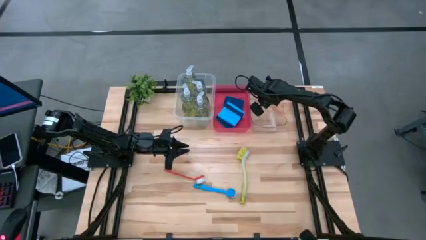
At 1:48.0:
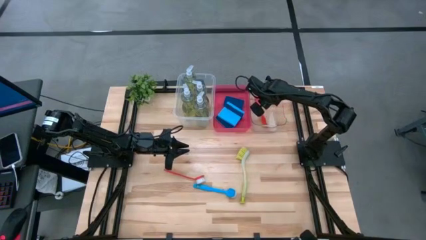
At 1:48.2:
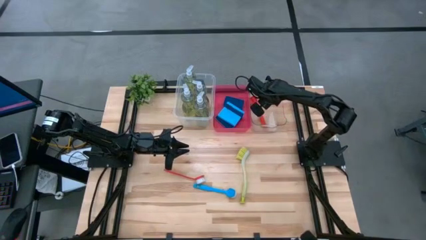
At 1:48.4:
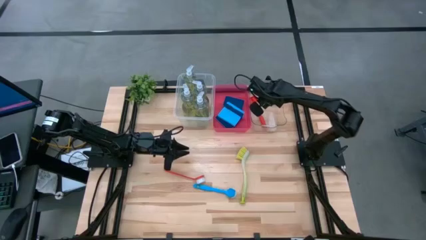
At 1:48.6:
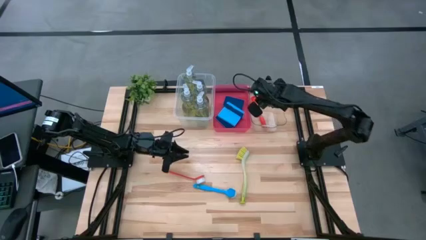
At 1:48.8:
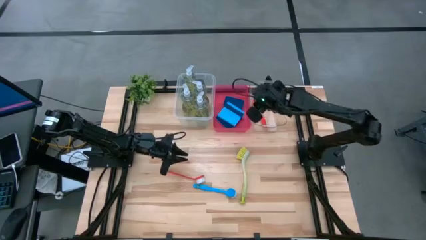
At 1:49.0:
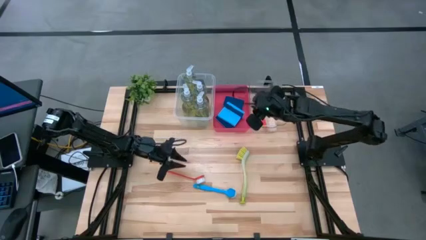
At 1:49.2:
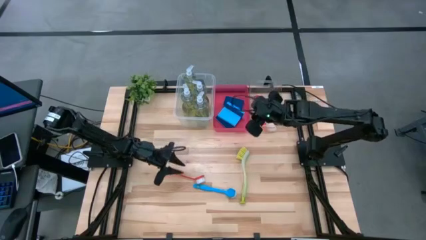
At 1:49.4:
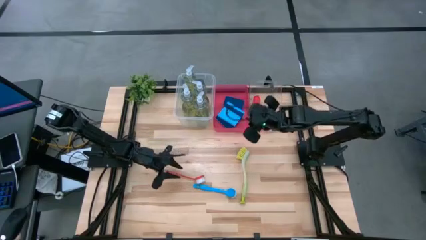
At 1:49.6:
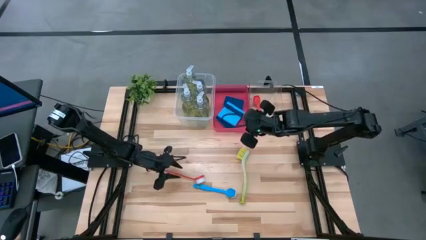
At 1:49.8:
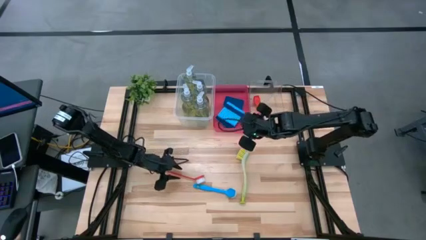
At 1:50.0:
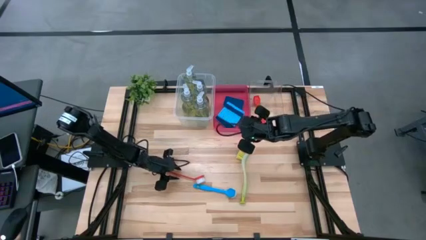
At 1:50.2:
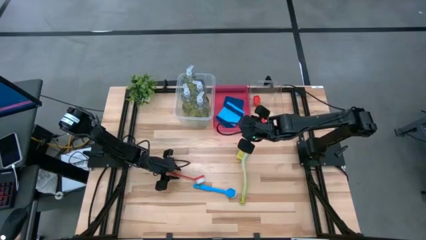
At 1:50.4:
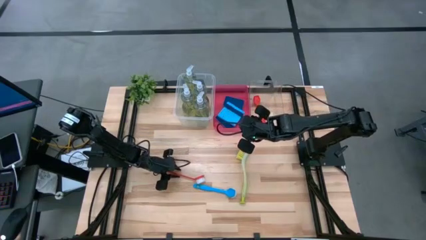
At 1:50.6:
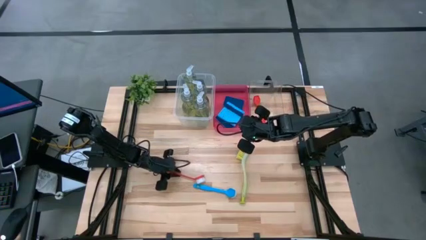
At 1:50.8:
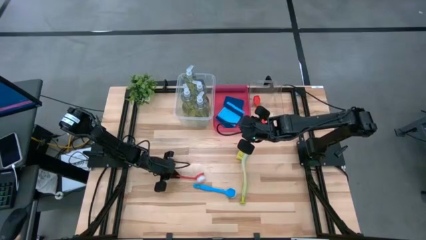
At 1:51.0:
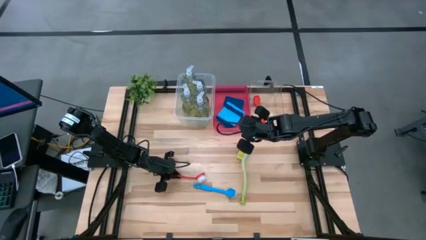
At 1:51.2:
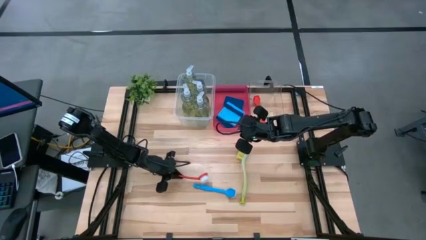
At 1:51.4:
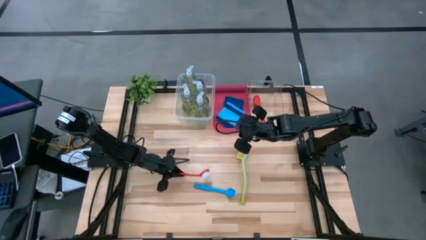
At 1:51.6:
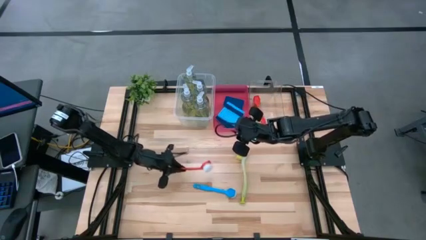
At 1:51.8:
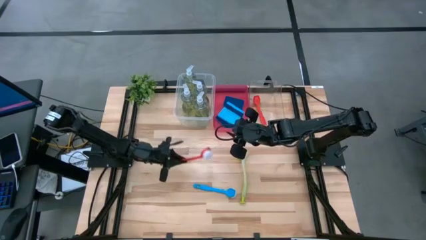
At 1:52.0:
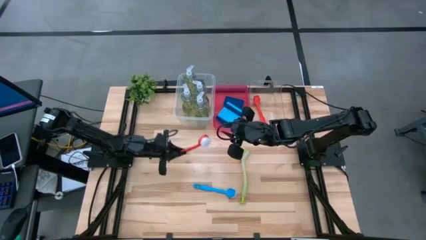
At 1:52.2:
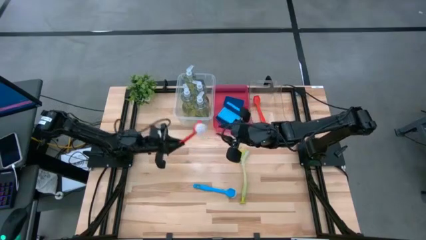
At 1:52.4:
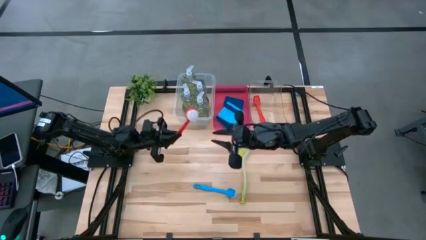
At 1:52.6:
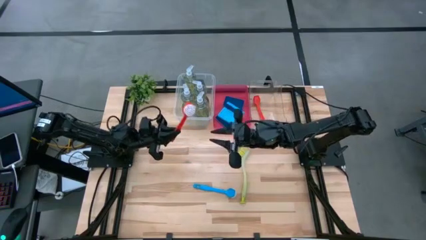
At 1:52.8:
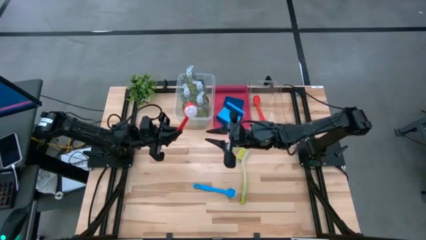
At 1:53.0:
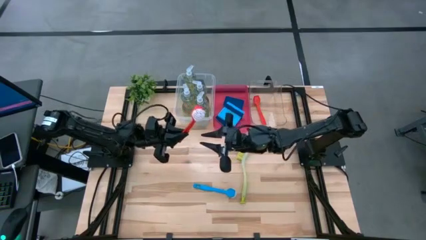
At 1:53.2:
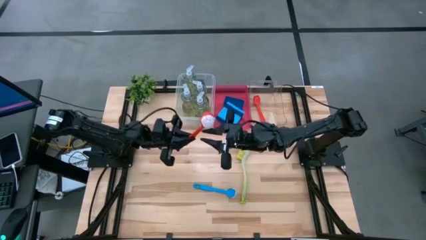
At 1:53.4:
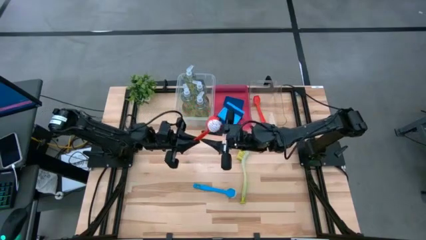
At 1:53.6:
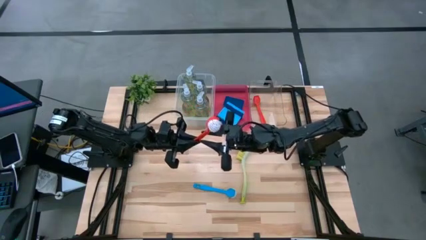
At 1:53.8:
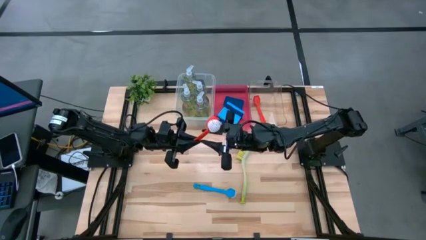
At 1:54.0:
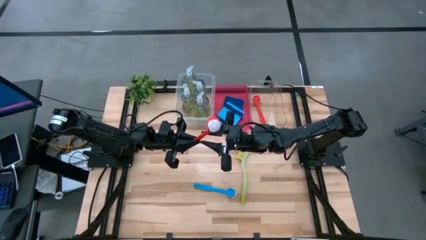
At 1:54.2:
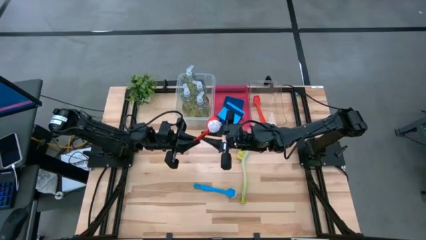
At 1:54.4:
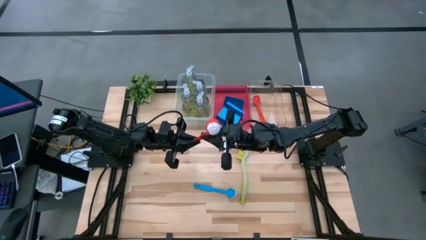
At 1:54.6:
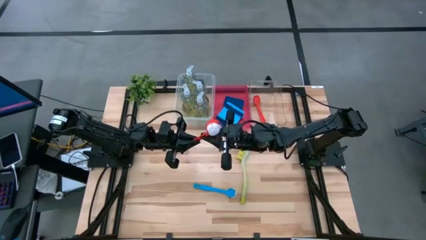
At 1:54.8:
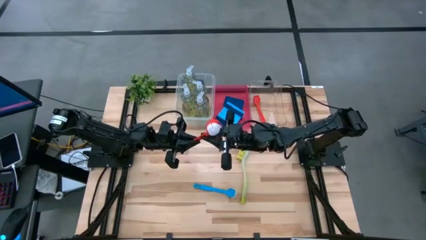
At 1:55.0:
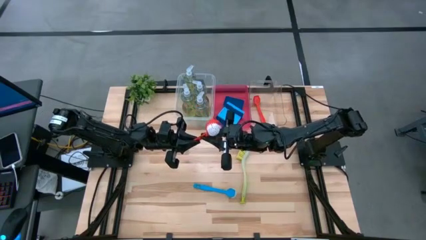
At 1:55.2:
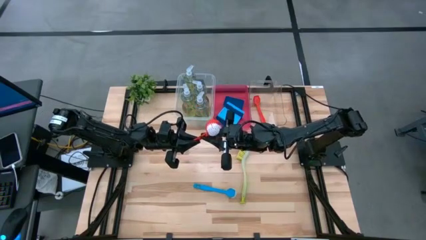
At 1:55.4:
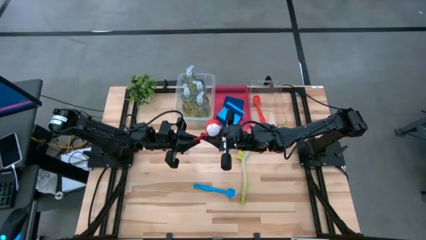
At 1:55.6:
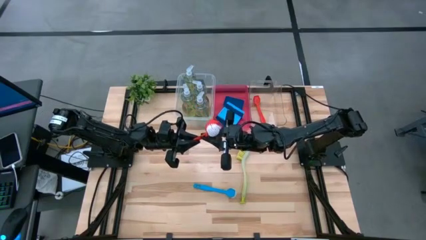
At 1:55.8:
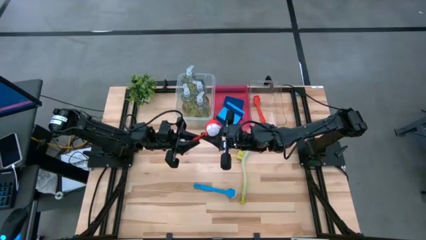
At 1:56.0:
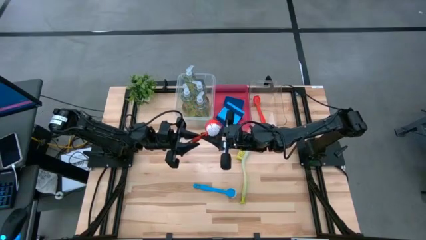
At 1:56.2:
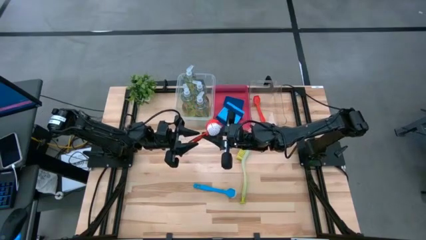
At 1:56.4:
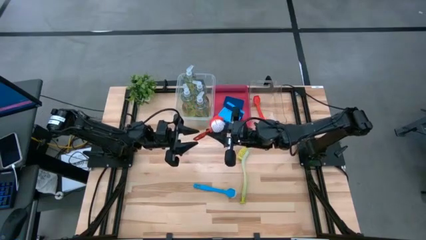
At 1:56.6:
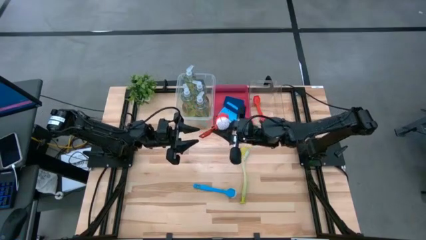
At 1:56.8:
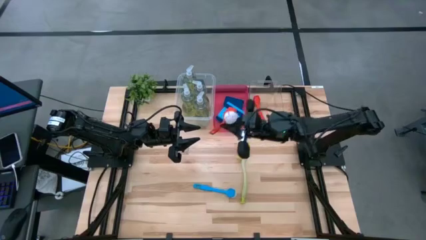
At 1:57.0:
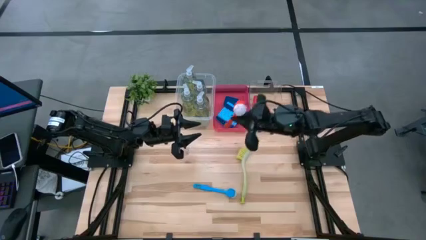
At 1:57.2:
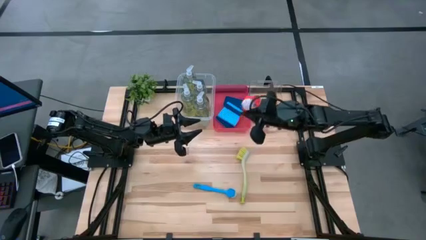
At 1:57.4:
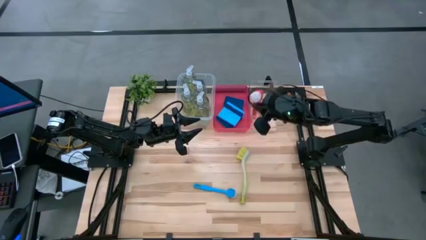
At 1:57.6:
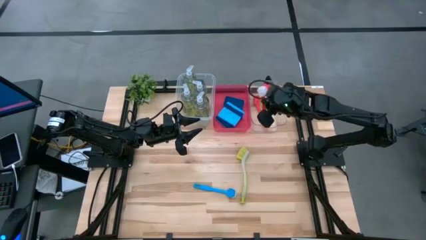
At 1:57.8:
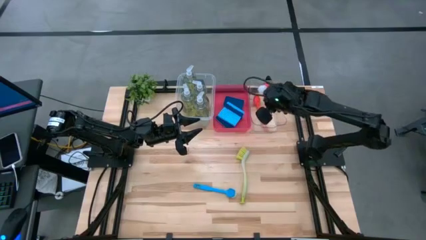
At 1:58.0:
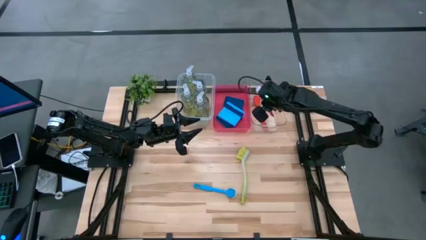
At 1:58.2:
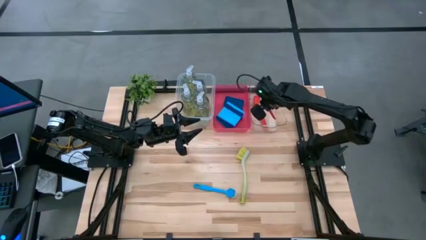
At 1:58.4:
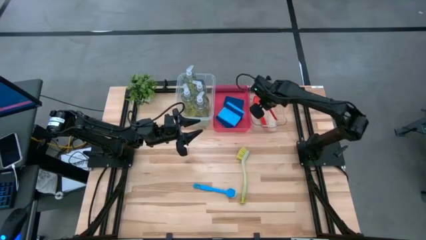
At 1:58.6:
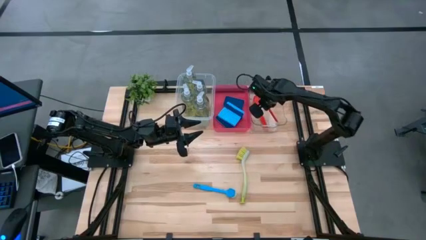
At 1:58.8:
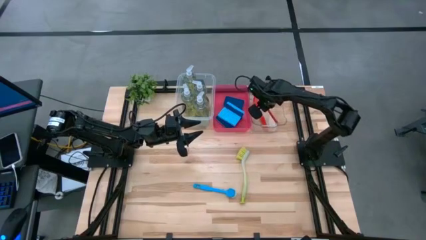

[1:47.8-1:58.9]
Task: Pick & Place Kitchen Sink Supplies
Put the red dish brush into the transparent bin

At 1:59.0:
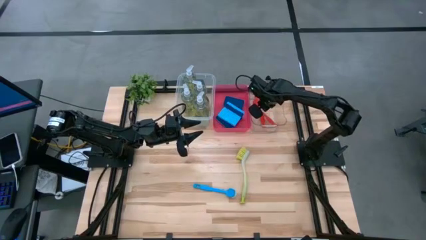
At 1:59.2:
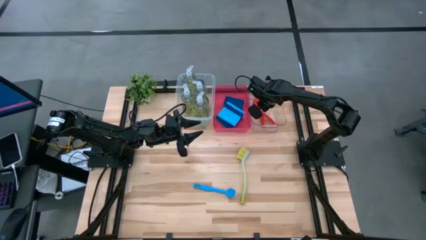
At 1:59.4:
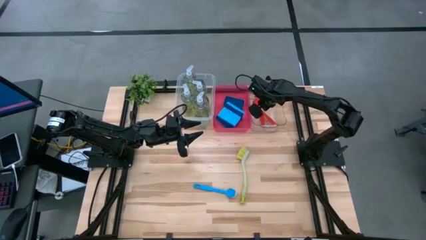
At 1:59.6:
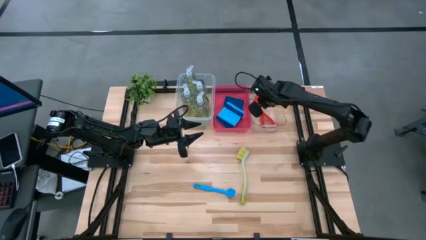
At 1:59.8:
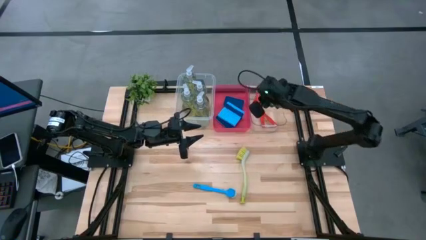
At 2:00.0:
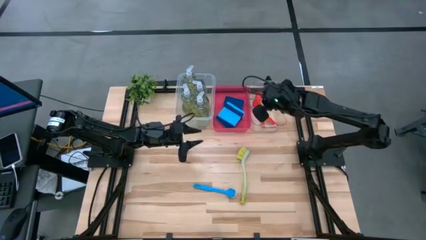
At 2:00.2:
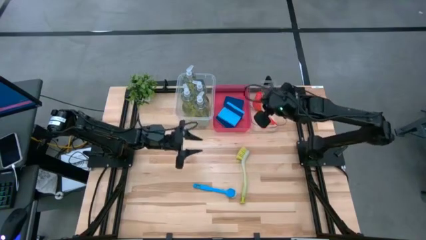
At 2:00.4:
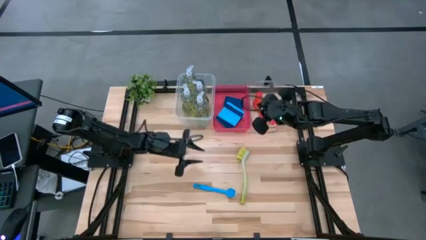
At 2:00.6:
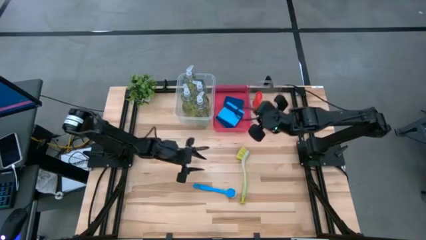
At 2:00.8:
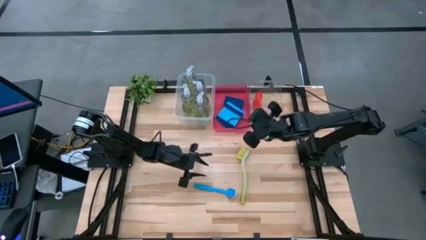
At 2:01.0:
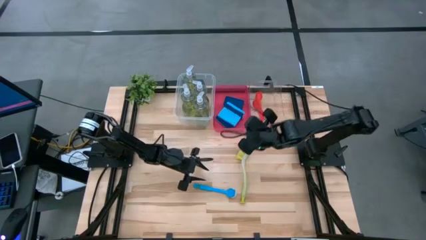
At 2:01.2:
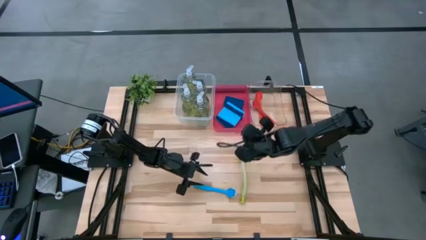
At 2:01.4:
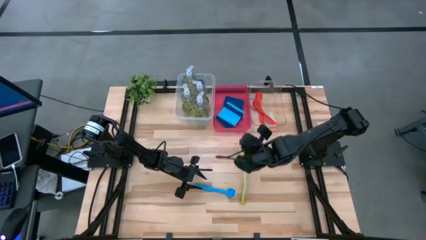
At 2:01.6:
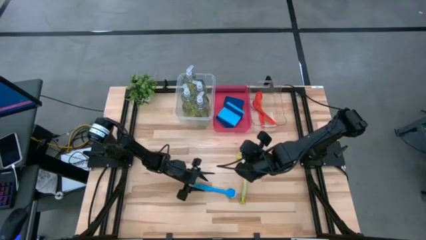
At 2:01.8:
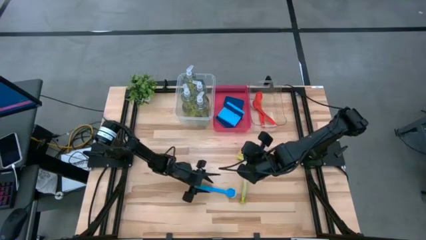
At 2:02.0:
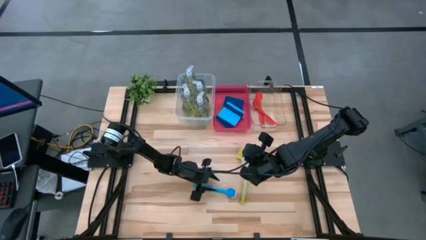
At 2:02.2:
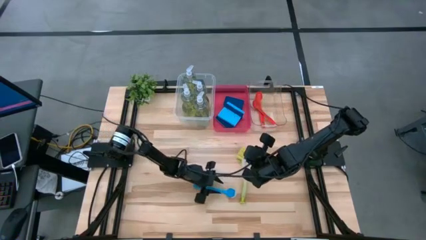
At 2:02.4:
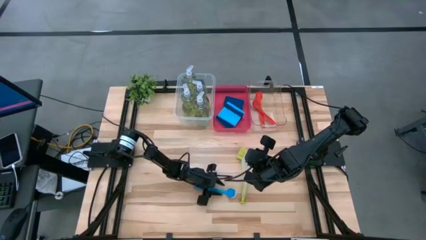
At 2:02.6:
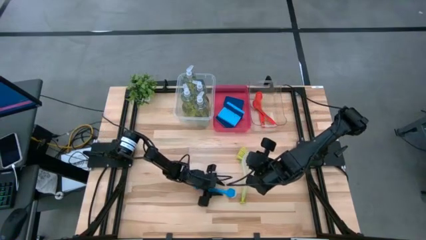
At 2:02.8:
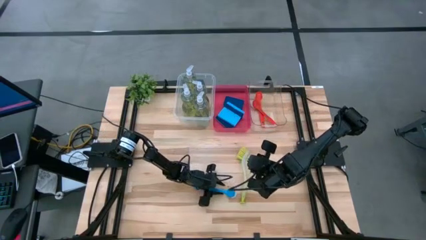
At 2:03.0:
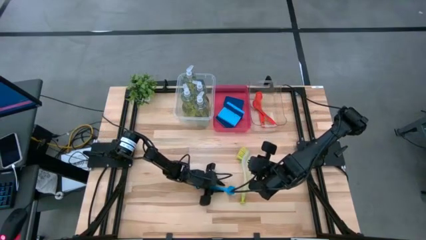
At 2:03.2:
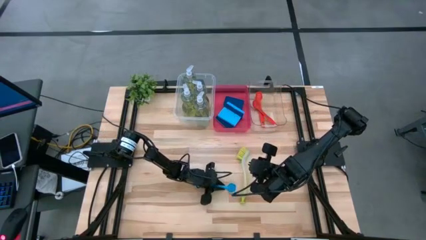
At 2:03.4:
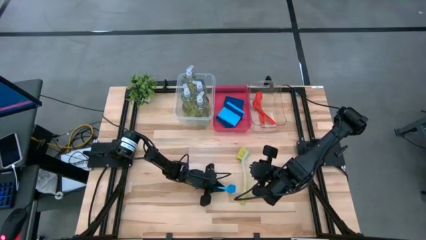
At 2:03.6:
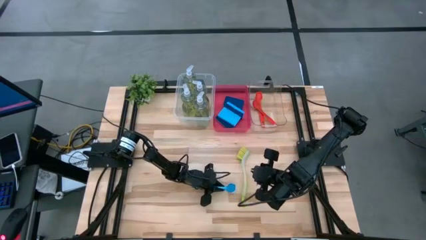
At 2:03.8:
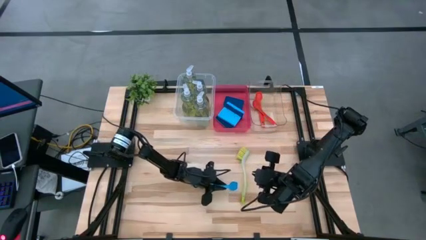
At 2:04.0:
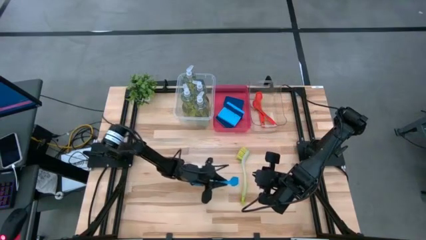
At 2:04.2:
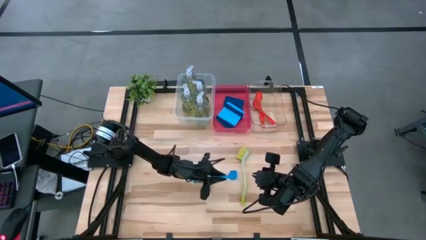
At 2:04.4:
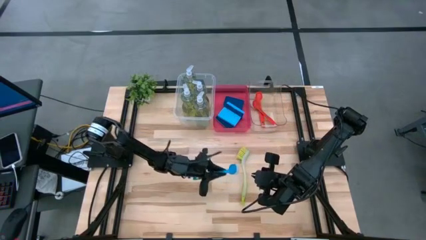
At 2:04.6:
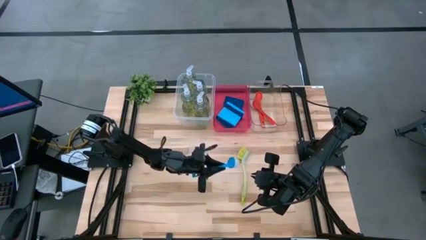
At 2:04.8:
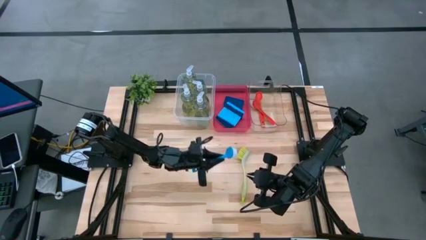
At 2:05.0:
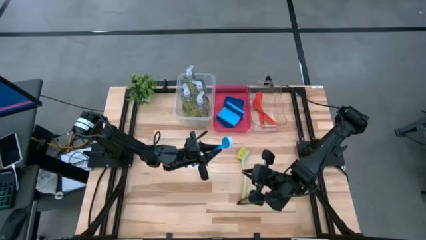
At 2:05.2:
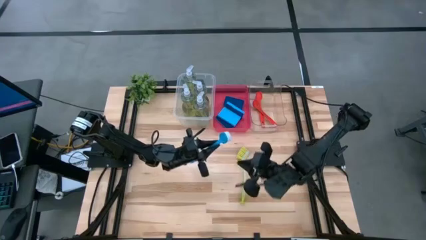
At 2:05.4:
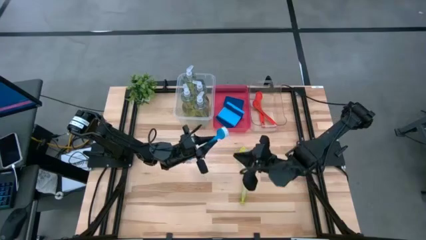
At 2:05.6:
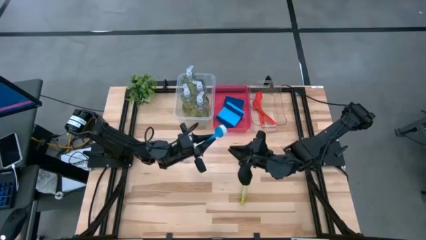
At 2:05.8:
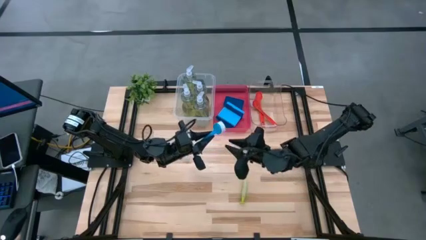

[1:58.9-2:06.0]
Put the blue dish brush into the transparent bin
